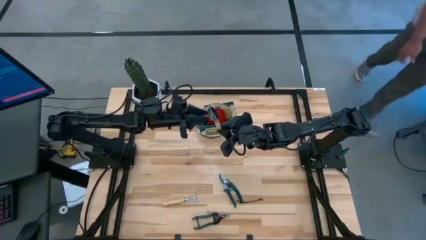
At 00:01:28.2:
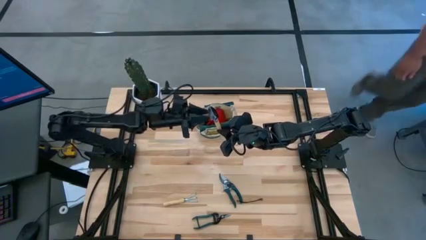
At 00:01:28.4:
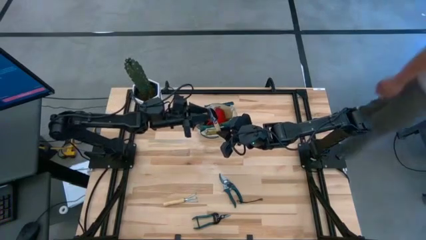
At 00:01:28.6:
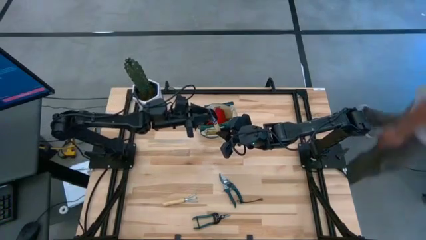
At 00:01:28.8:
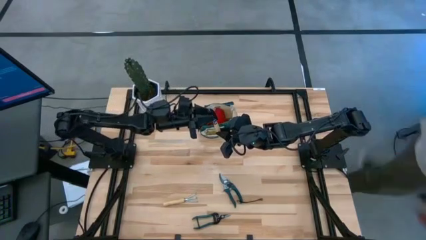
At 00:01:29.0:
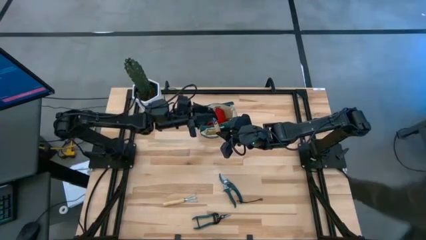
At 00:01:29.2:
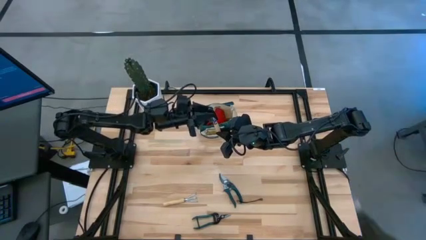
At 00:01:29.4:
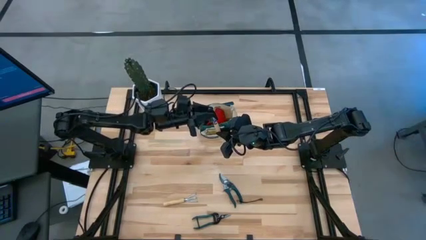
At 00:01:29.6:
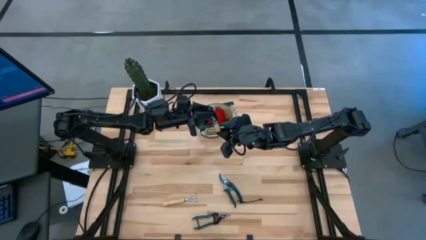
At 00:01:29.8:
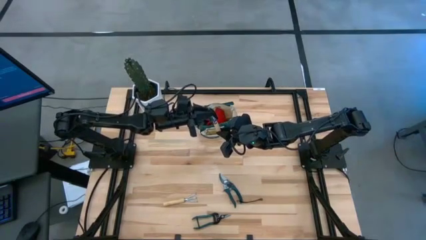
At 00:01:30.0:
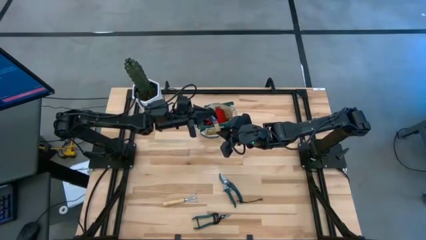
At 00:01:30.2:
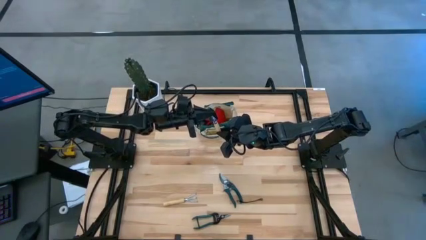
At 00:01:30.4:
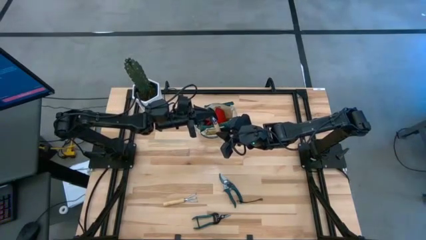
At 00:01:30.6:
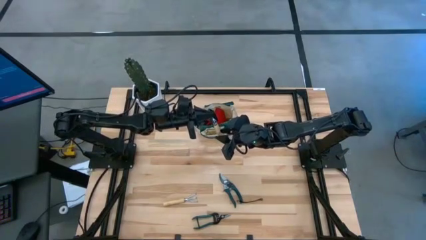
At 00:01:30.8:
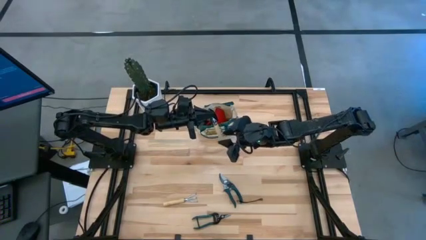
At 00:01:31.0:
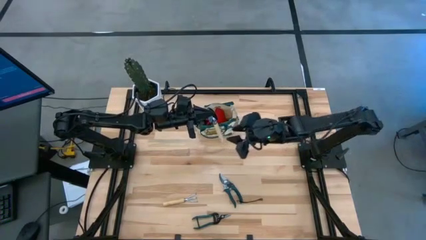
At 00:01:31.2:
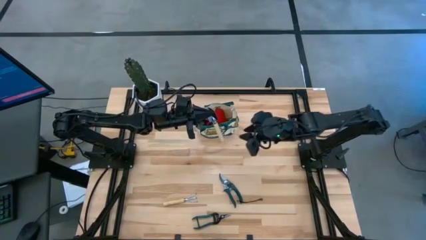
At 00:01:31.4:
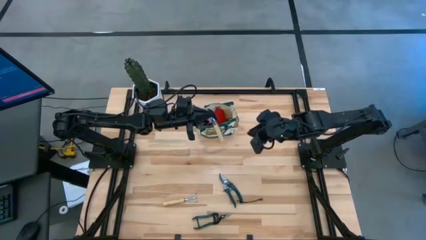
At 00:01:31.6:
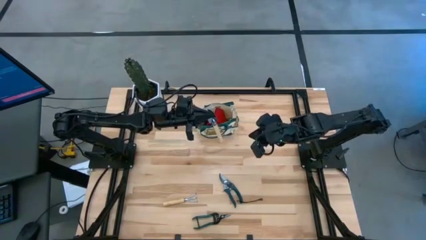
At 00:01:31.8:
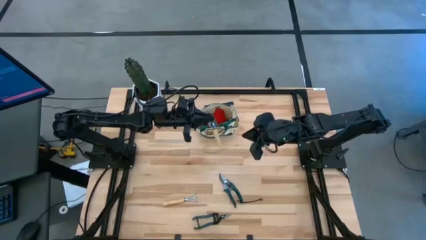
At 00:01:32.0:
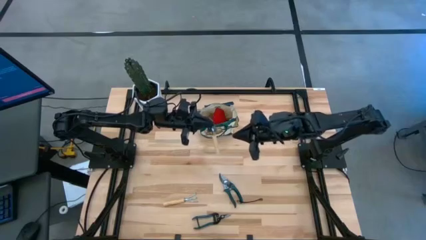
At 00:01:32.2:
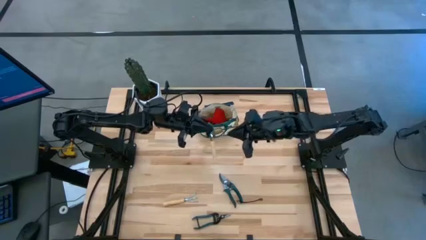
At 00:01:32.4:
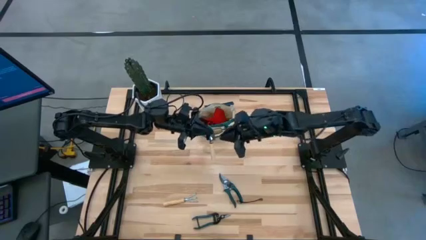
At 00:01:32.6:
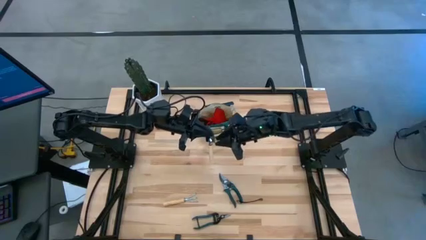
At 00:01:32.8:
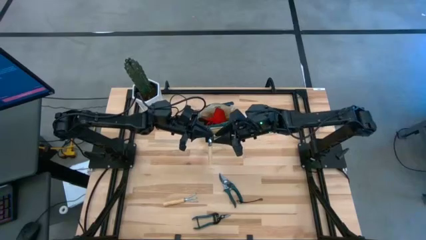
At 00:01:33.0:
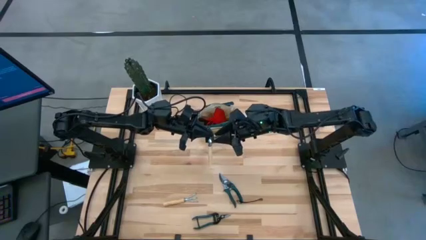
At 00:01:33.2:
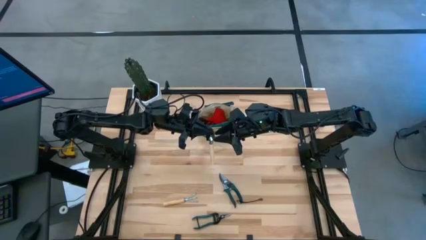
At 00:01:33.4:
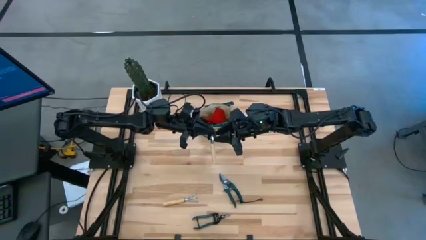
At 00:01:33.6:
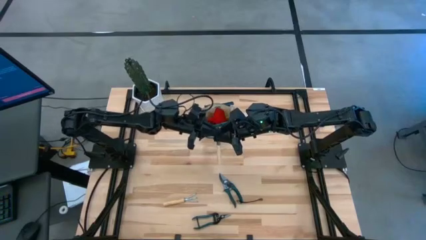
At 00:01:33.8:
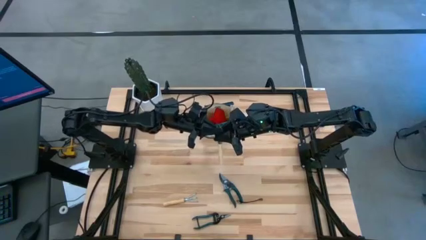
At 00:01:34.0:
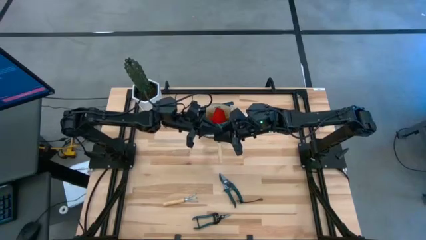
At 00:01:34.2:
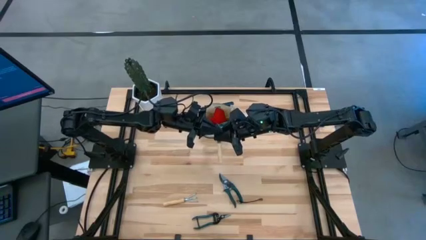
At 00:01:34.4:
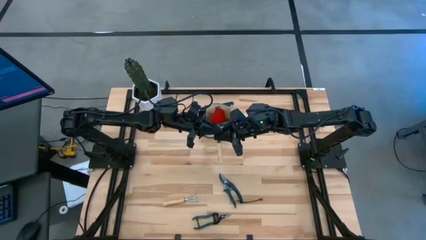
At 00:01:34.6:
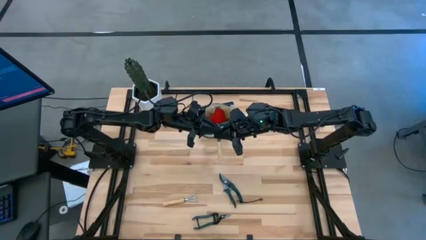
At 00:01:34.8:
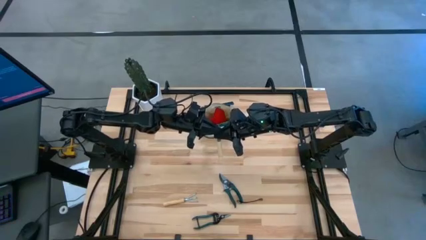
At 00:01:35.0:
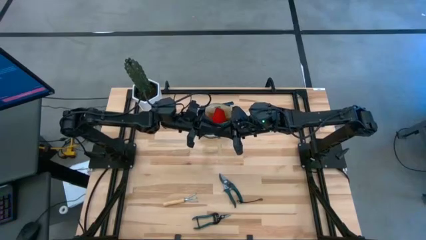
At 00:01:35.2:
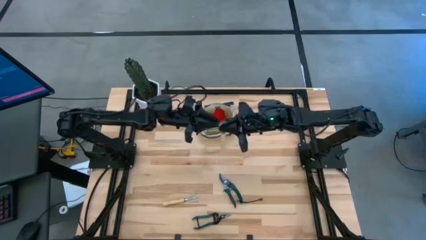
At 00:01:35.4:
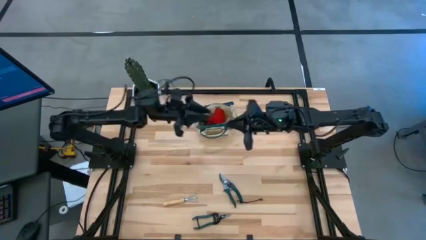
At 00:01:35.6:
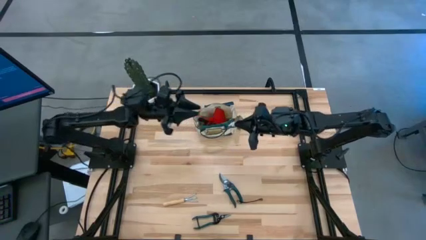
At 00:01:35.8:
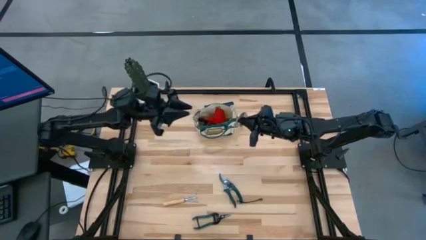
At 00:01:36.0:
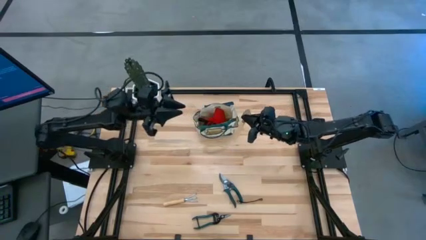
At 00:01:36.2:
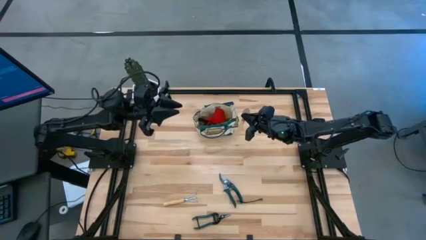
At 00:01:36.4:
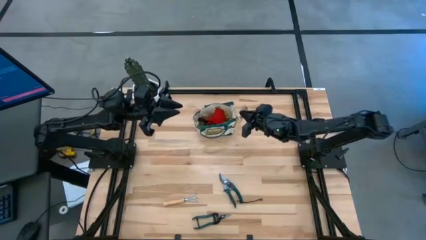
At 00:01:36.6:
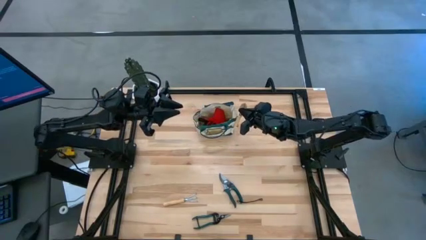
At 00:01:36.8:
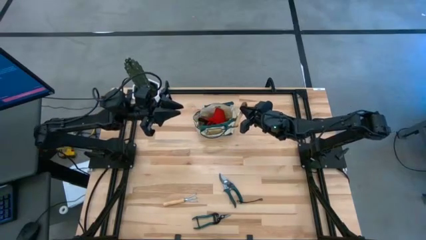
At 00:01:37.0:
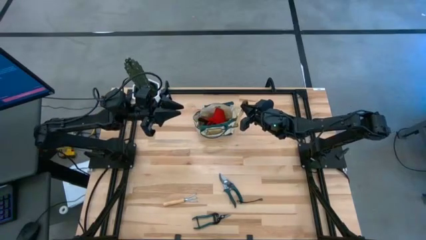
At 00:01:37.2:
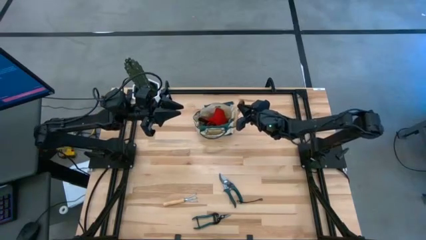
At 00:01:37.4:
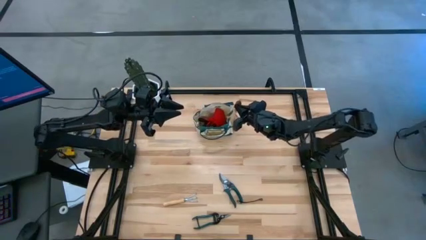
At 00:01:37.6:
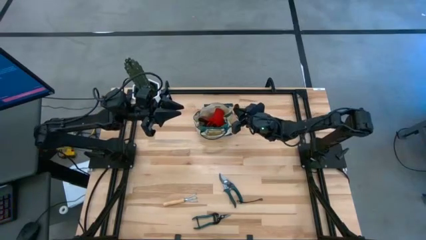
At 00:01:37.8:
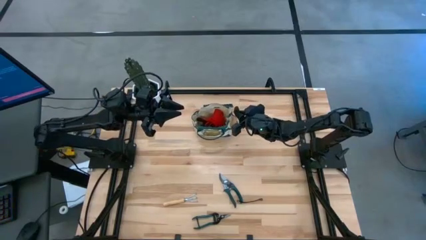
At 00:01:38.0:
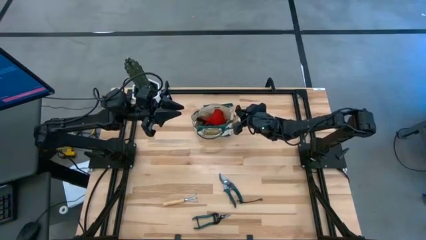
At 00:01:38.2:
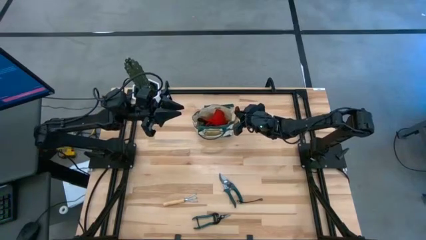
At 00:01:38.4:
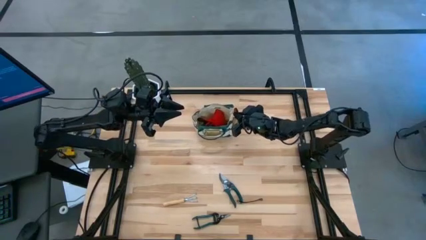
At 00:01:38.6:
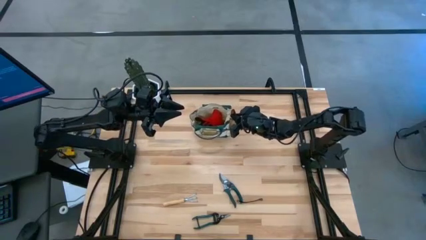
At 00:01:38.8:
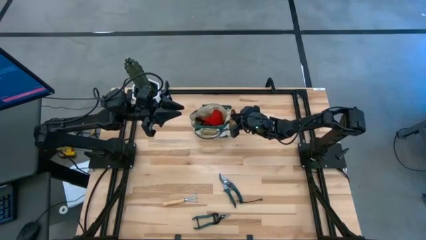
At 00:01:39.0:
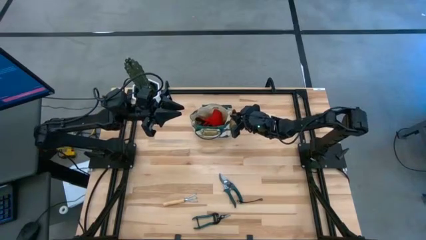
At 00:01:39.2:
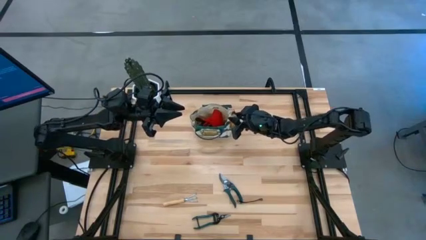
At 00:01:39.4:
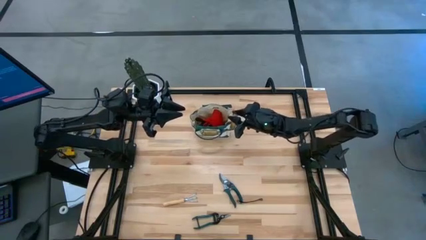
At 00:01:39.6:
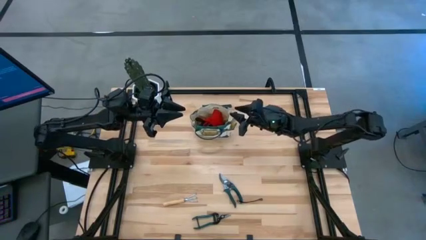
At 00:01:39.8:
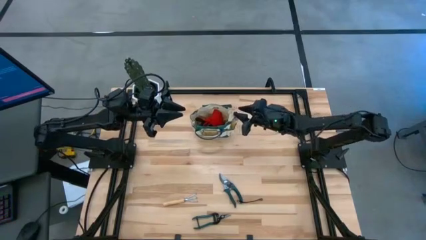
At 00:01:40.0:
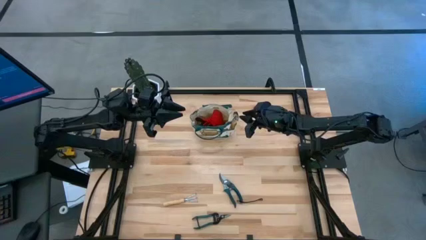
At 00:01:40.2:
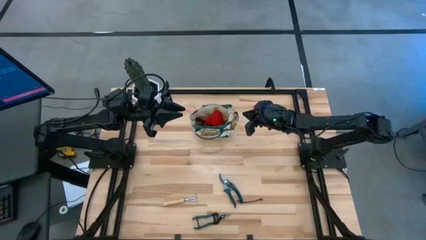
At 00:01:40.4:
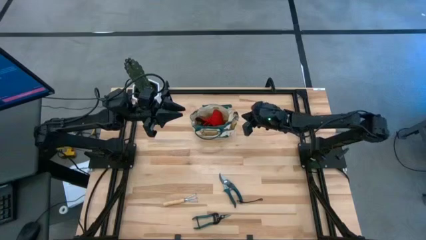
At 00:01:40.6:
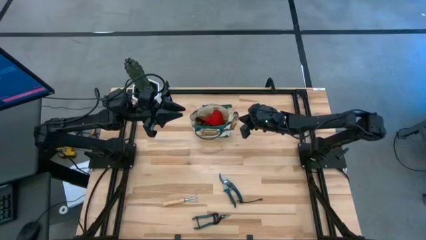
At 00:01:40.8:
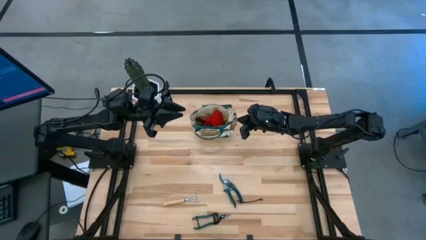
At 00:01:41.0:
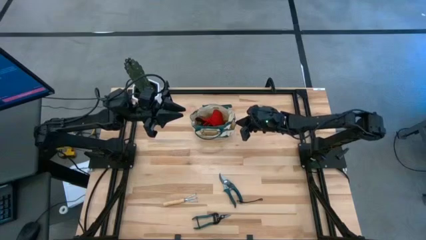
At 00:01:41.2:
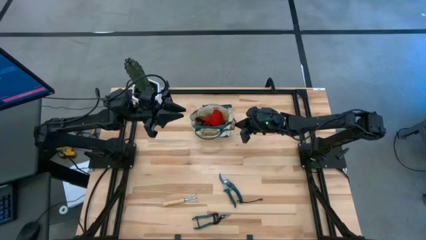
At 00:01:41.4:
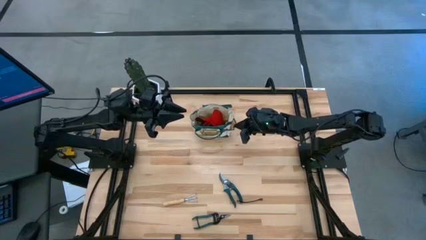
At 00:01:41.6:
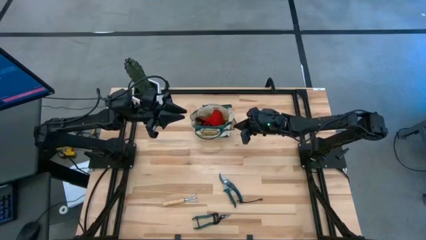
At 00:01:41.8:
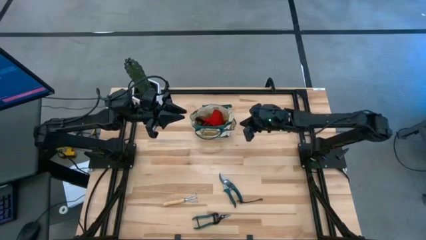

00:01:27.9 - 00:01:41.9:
Task: Pick & Place Garden tools in Gardening bag
Put the trowel into the side pocket of the gardening bag
